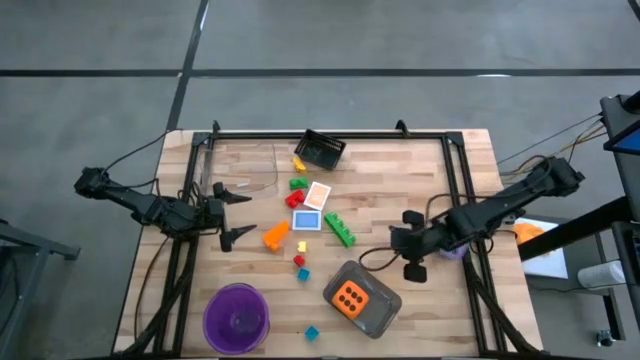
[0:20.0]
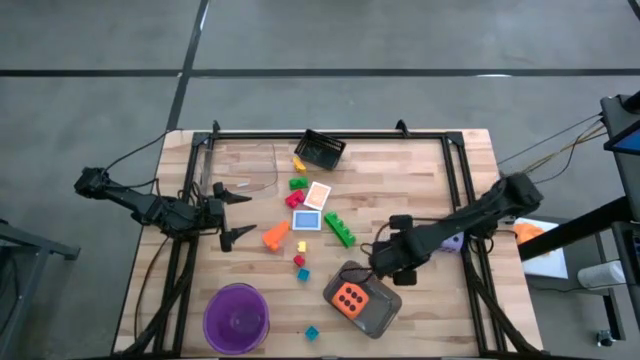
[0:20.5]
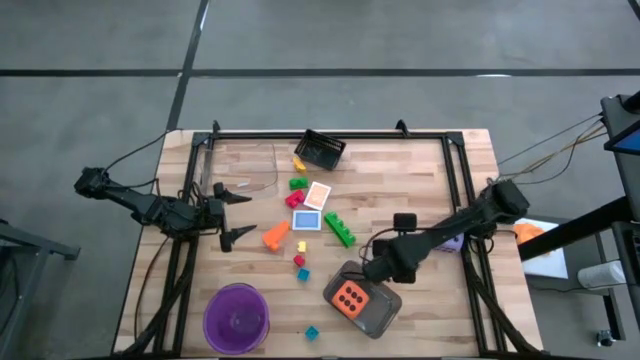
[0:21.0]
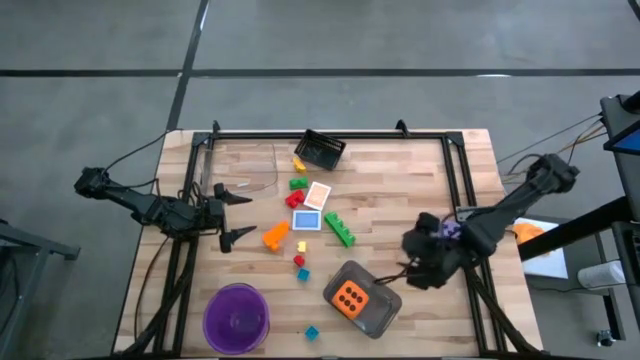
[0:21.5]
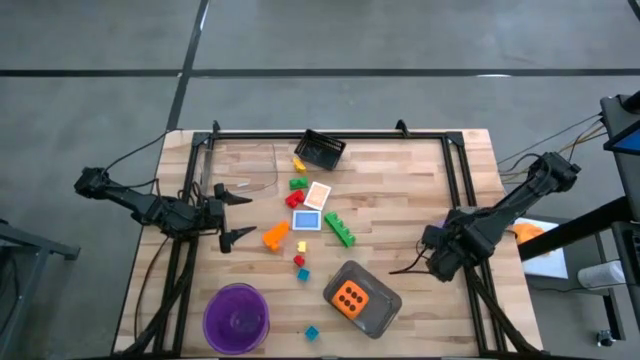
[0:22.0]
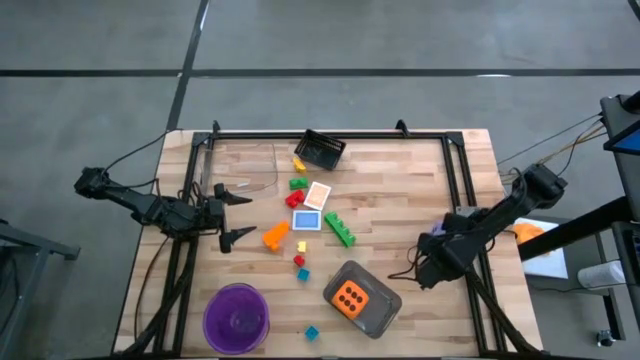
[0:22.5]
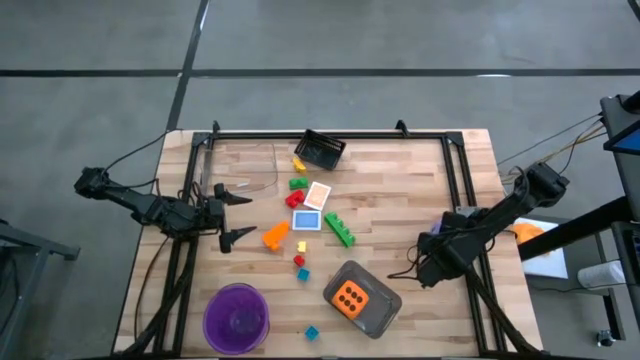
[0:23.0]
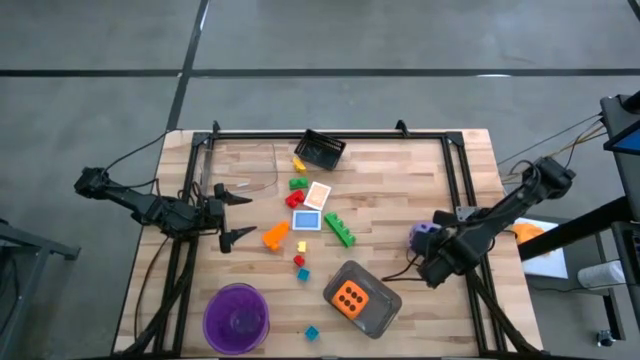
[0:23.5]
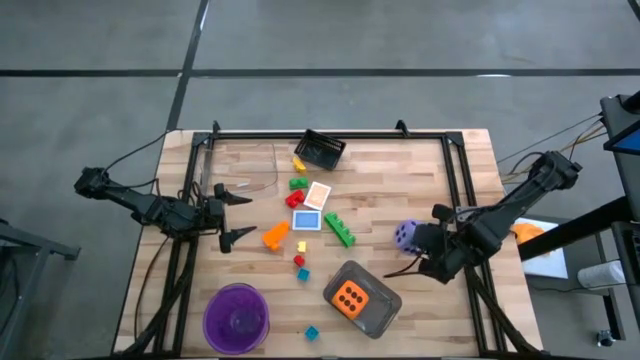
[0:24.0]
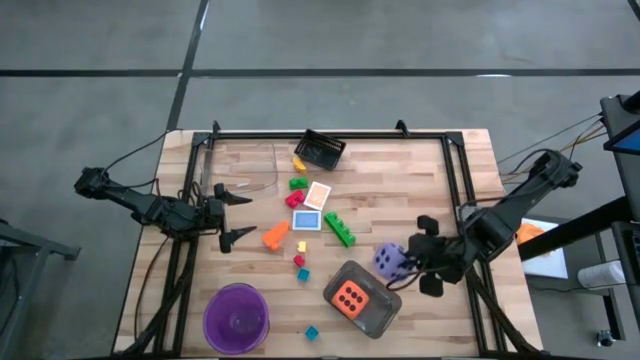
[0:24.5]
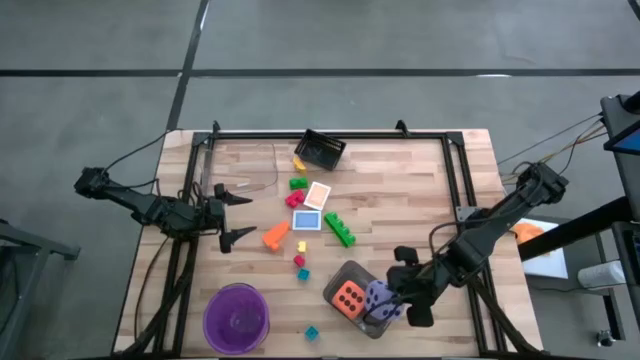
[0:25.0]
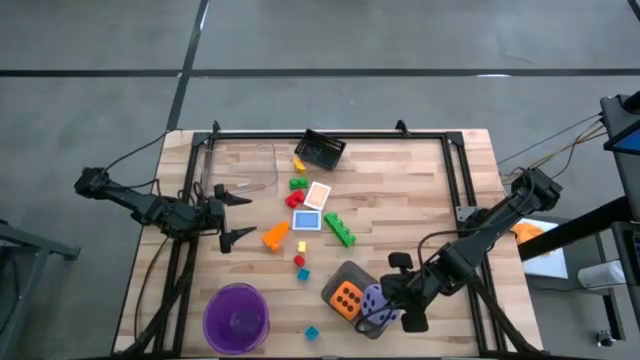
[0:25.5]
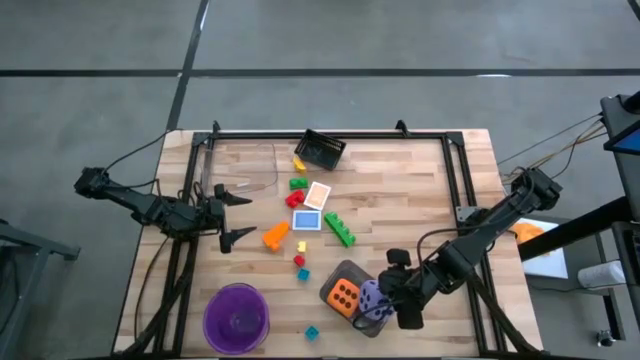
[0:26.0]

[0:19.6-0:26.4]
Task: Pick & Place Toys
Put the violet die into the gray bin

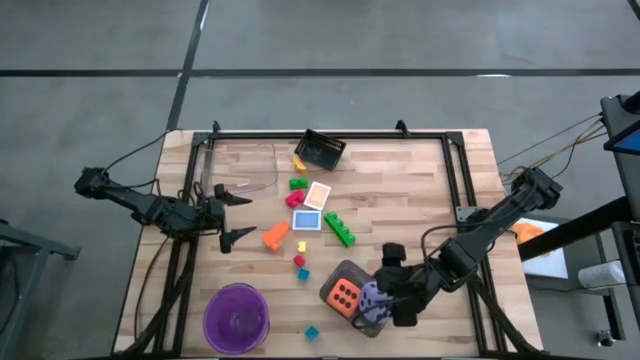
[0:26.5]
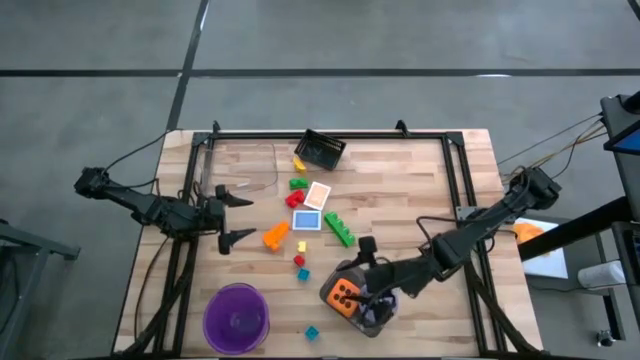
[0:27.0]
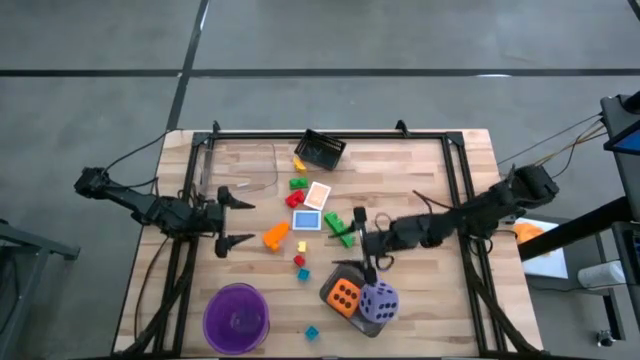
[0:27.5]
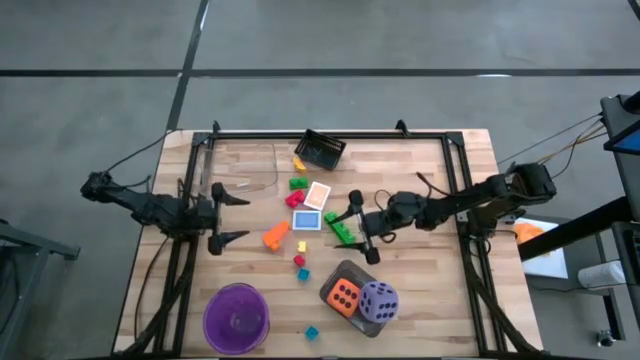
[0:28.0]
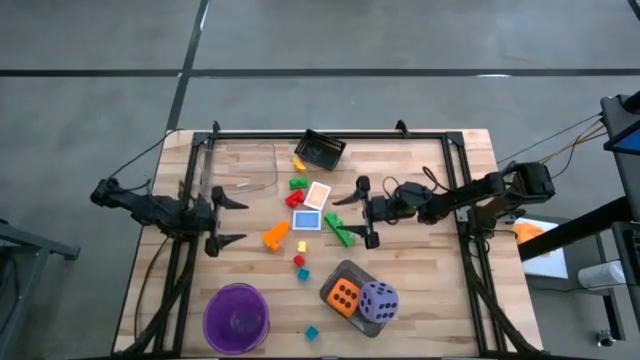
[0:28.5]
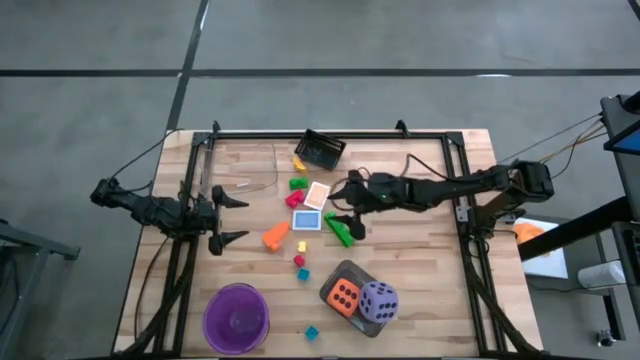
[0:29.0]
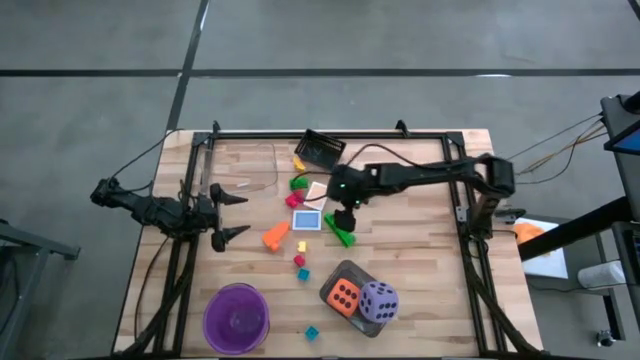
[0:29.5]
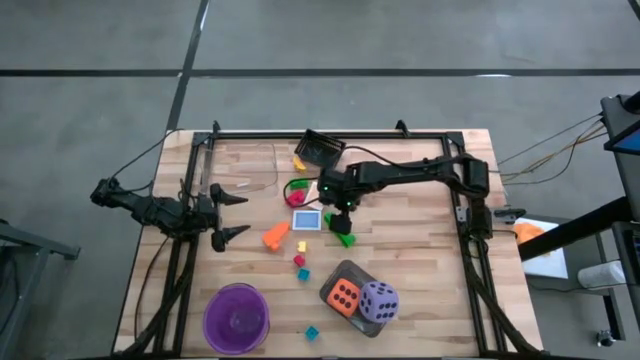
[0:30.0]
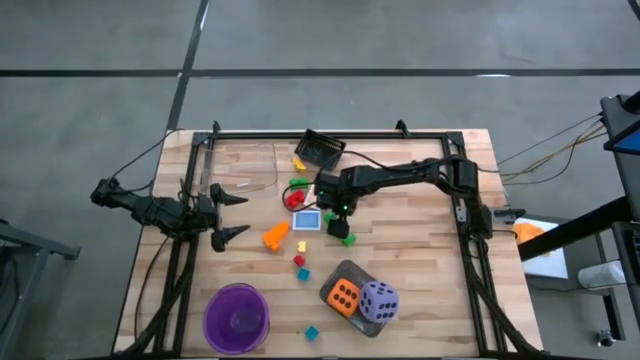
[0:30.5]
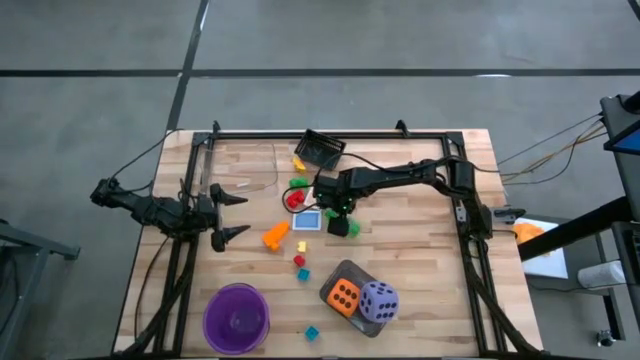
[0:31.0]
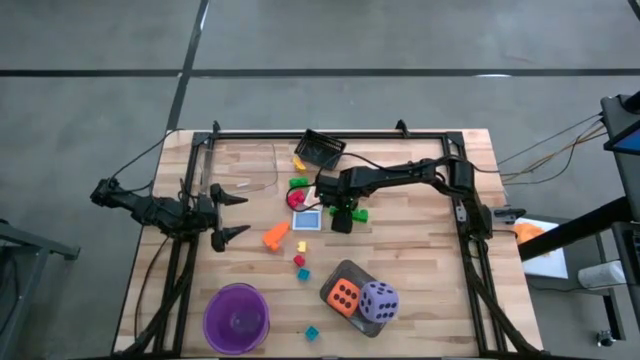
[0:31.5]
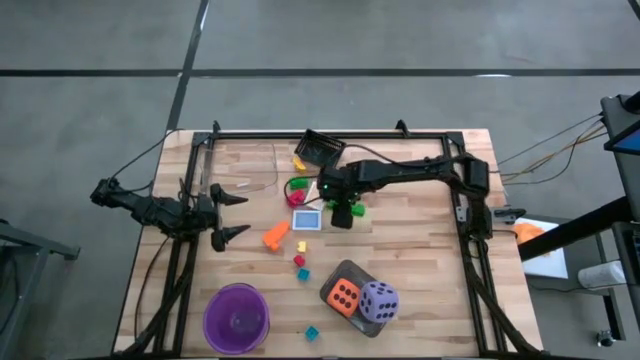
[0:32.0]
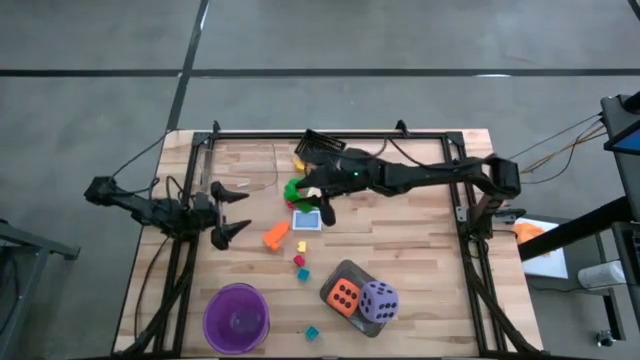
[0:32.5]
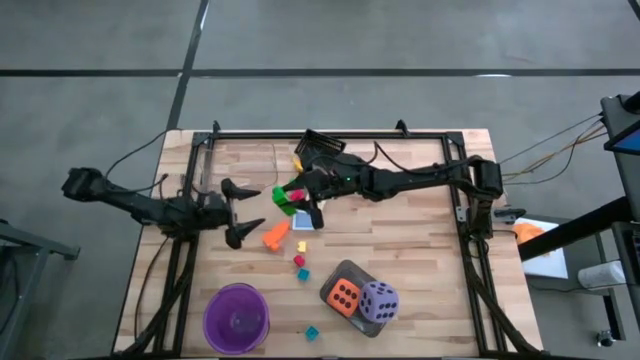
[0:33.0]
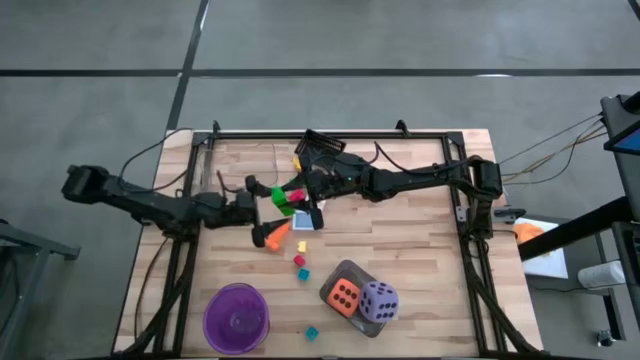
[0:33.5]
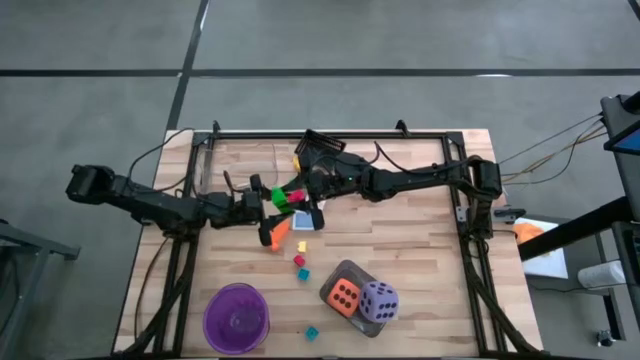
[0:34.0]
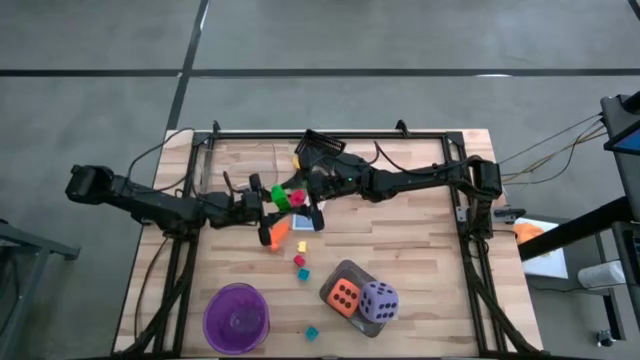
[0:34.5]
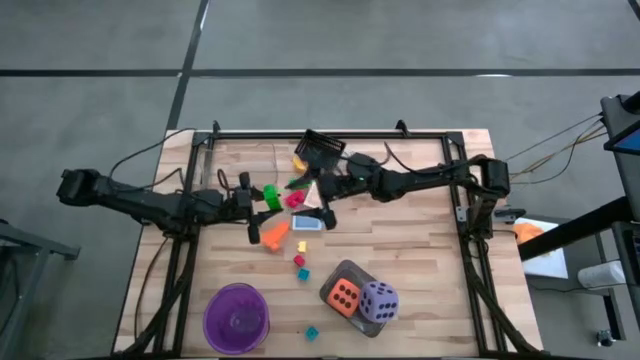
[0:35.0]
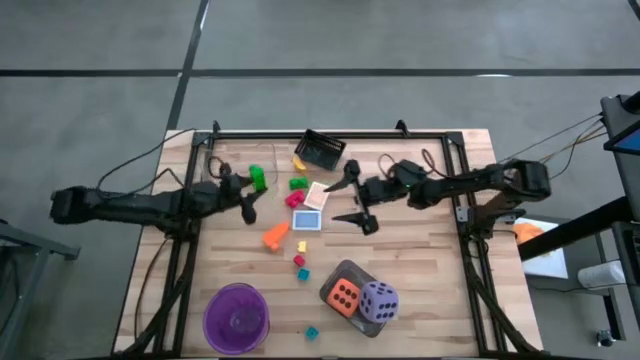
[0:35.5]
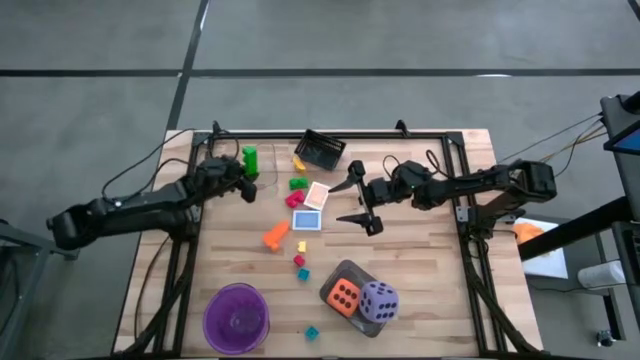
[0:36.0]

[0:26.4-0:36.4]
Put the bottom green game piece into the transparent bin

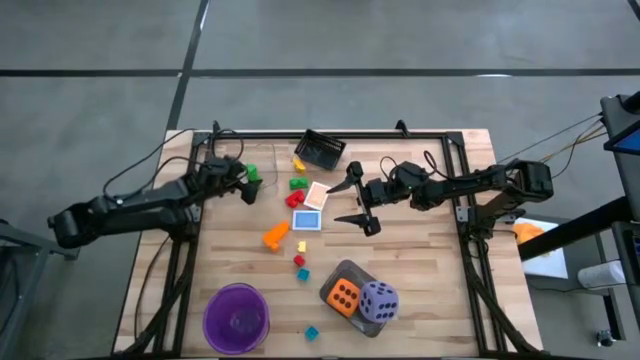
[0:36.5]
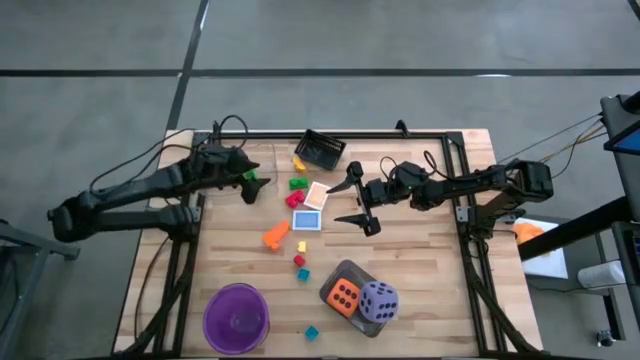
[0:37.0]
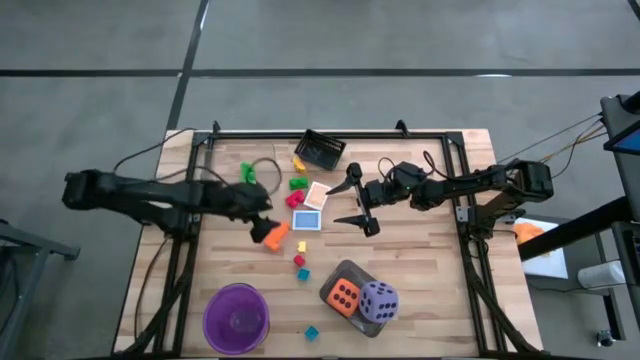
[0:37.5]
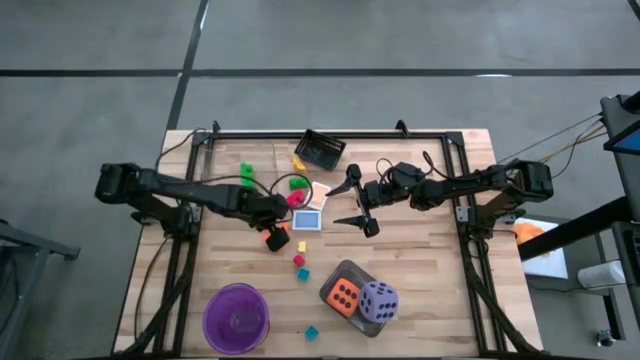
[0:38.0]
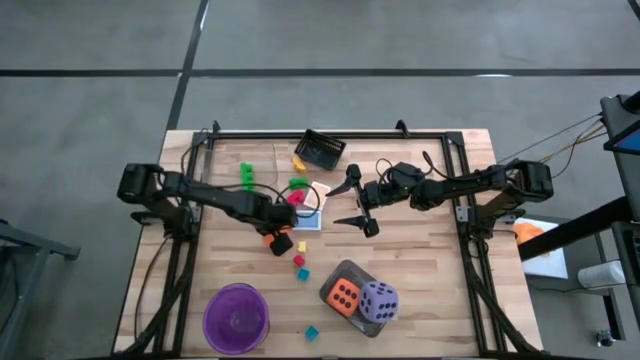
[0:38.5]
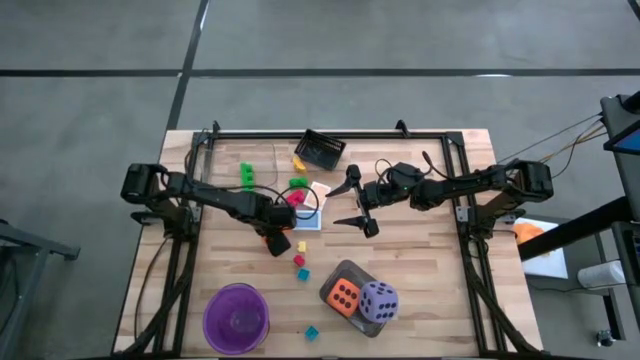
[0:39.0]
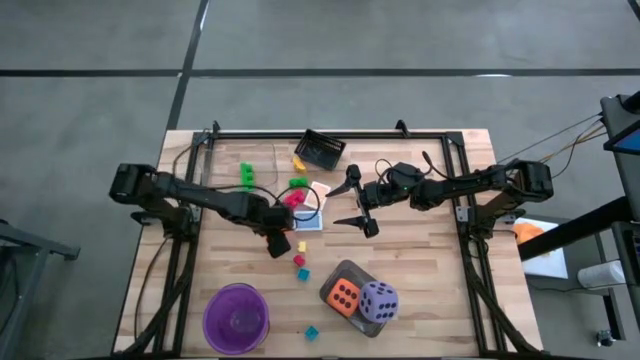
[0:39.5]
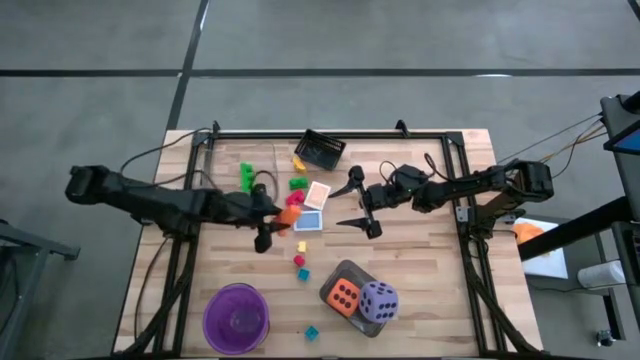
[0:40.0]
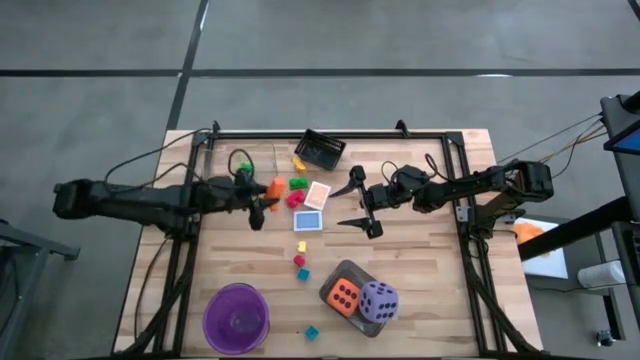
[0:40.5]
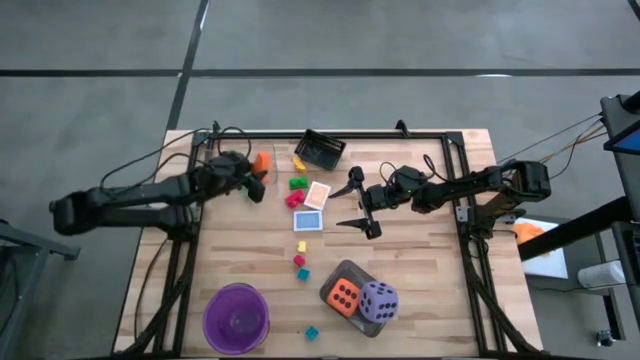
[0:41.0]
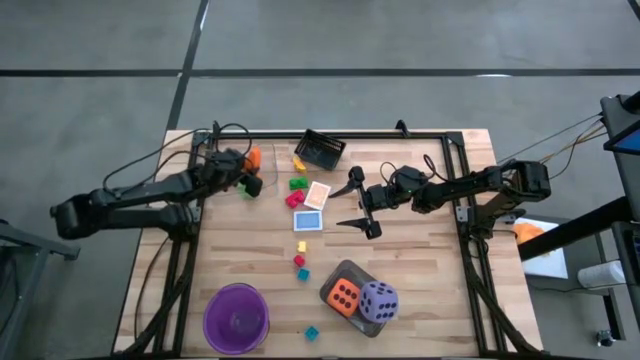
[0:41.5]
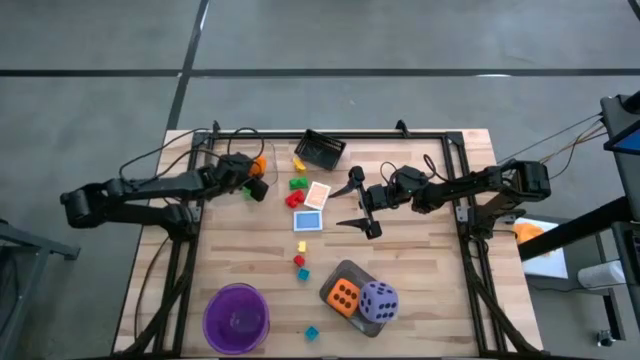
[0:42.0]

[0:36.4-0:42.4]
Put the orange game piece into the transparent bin
